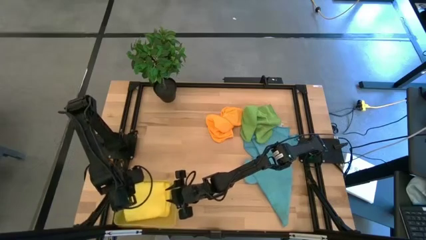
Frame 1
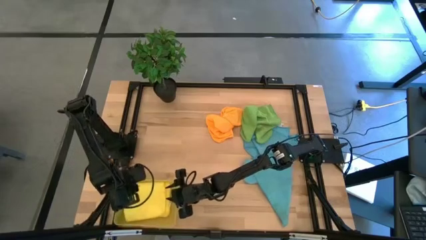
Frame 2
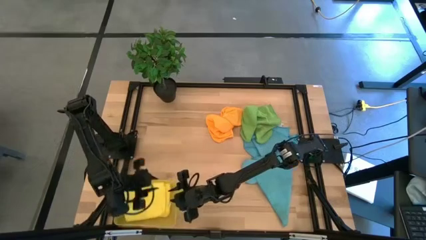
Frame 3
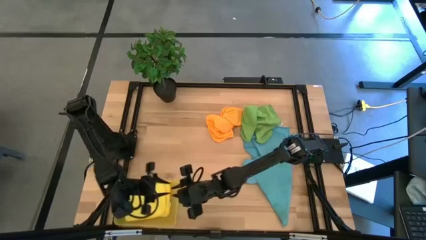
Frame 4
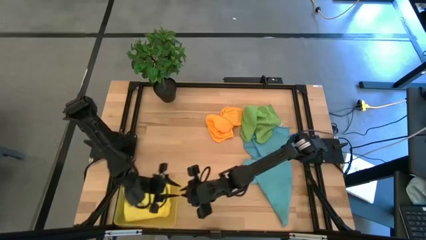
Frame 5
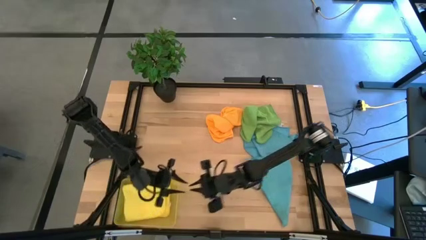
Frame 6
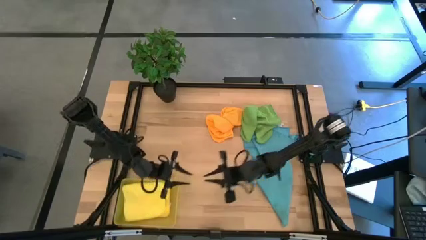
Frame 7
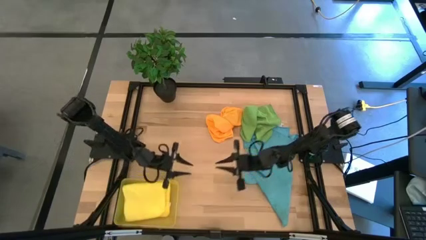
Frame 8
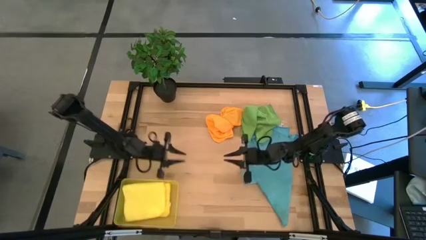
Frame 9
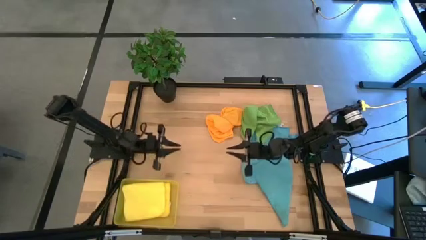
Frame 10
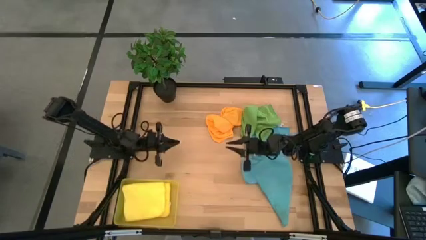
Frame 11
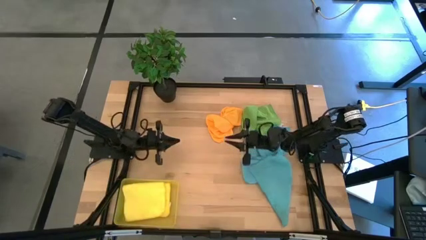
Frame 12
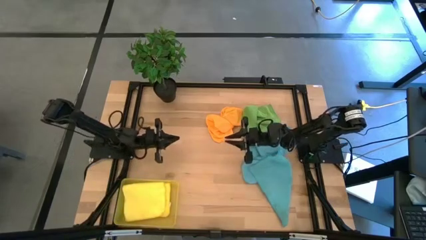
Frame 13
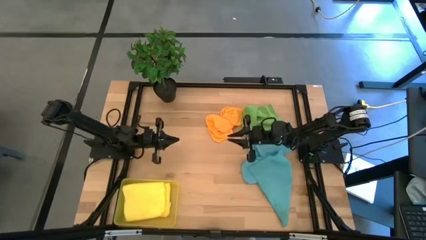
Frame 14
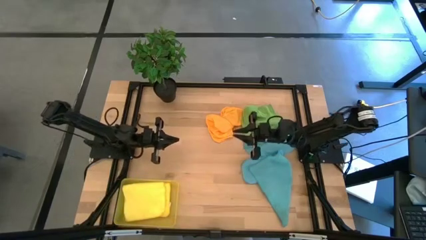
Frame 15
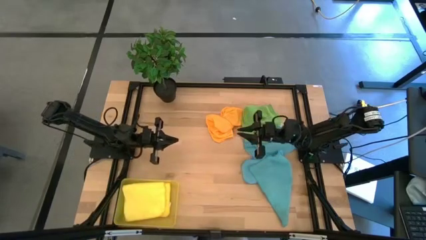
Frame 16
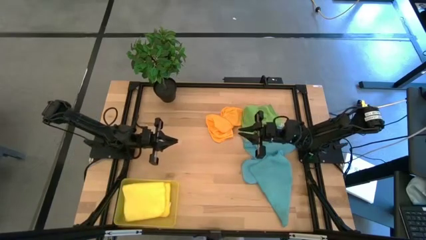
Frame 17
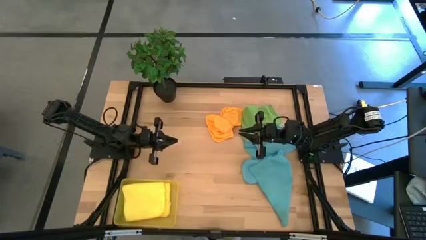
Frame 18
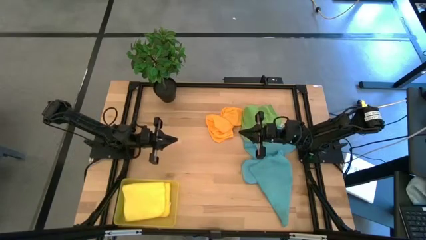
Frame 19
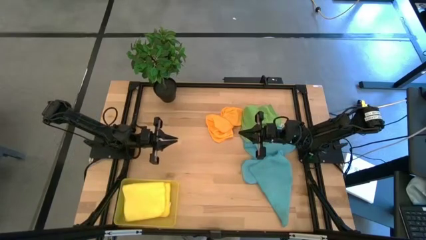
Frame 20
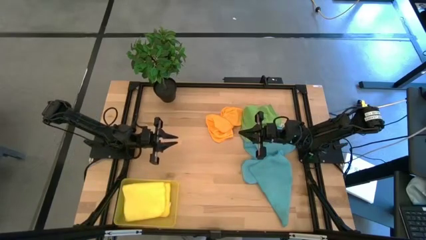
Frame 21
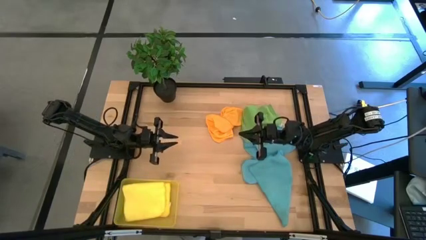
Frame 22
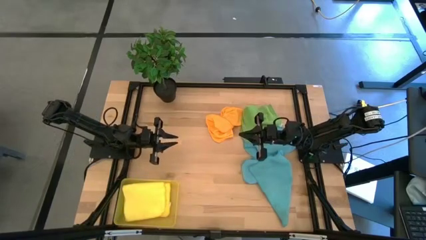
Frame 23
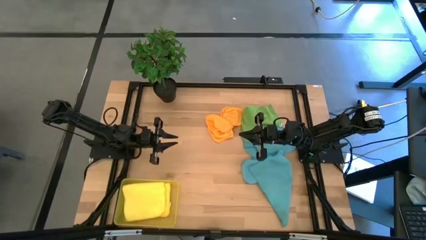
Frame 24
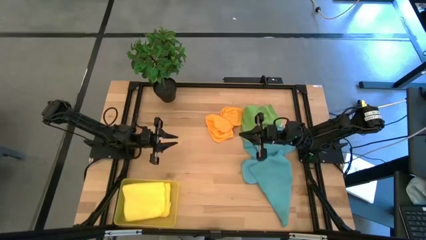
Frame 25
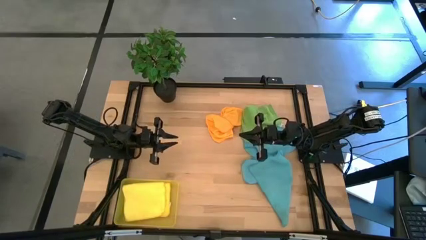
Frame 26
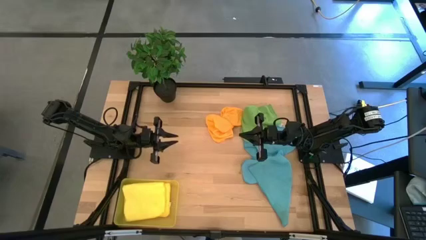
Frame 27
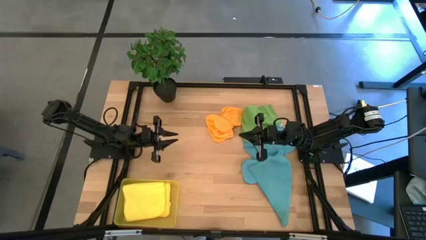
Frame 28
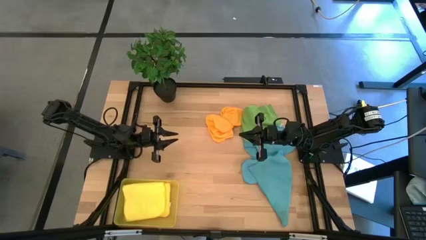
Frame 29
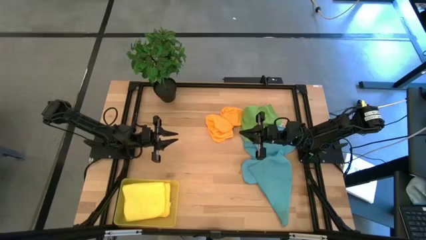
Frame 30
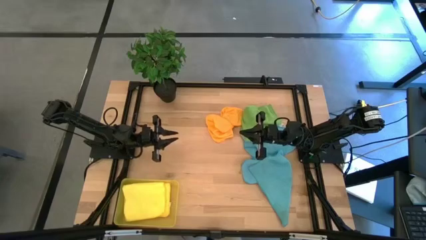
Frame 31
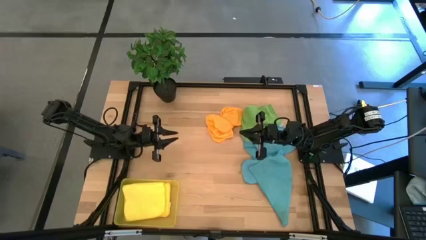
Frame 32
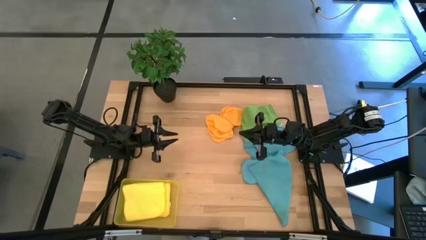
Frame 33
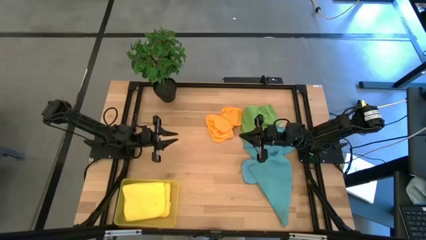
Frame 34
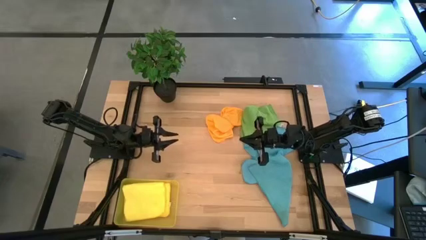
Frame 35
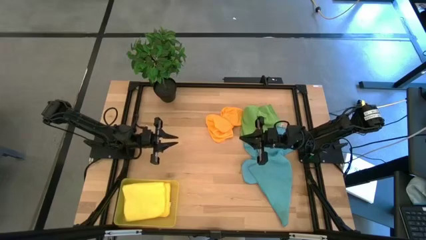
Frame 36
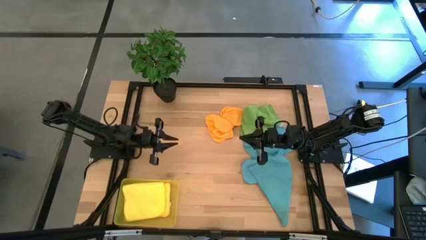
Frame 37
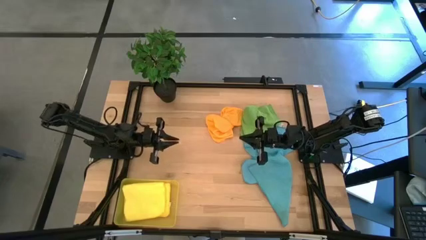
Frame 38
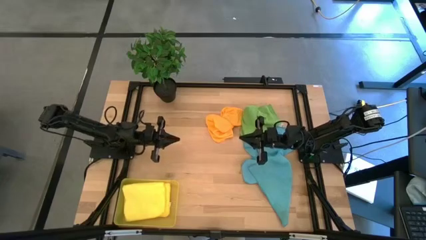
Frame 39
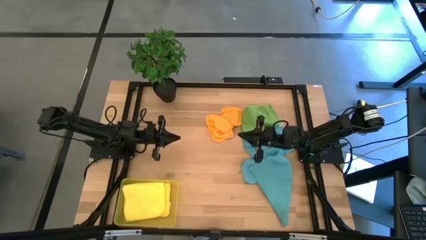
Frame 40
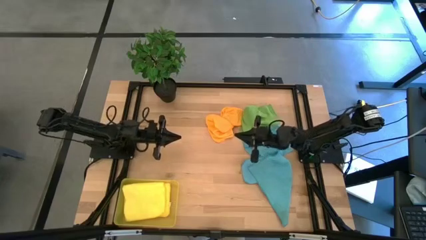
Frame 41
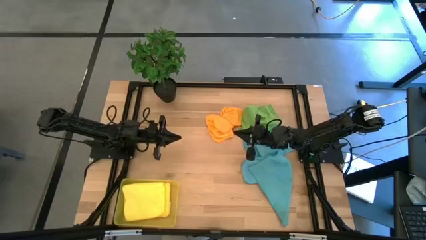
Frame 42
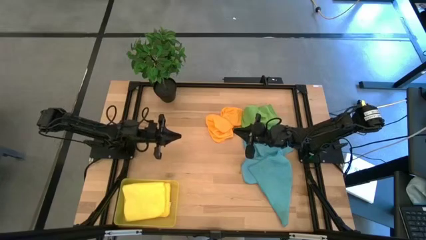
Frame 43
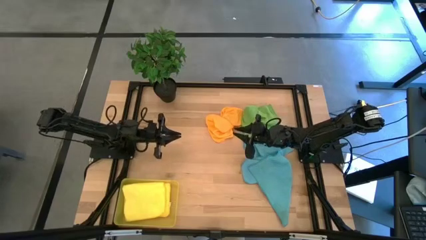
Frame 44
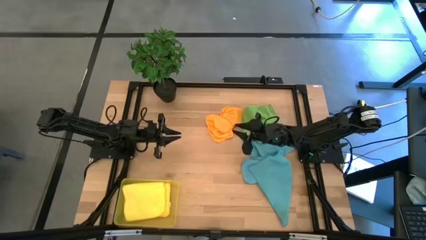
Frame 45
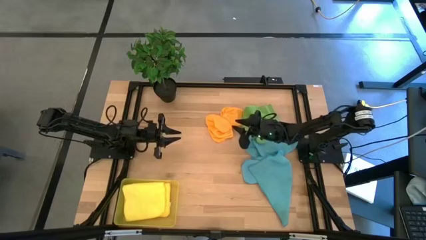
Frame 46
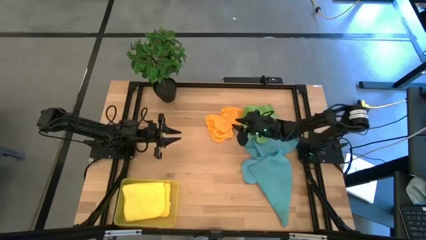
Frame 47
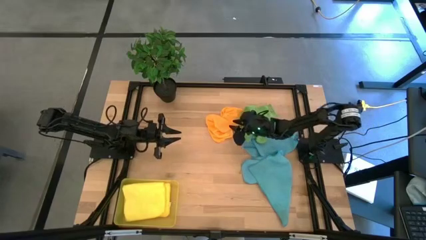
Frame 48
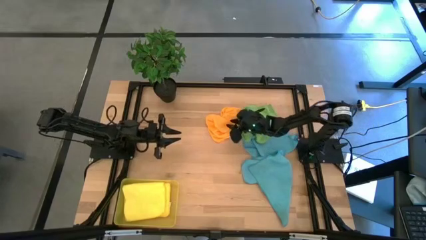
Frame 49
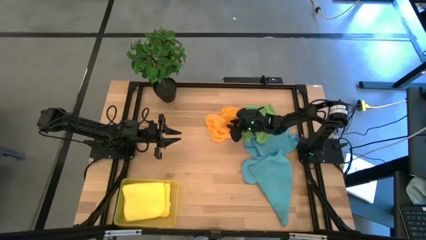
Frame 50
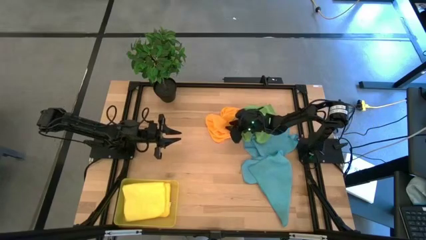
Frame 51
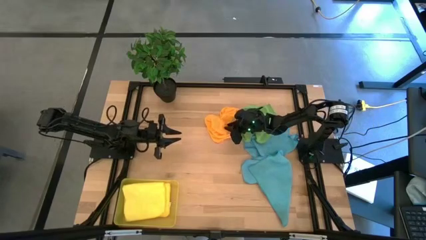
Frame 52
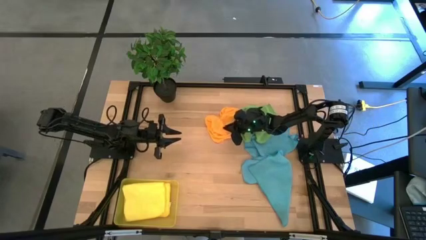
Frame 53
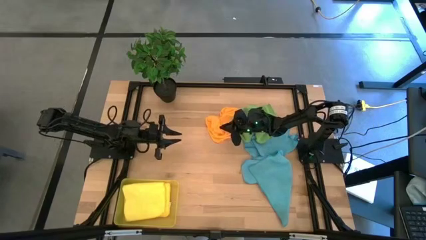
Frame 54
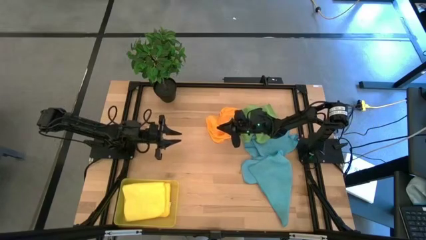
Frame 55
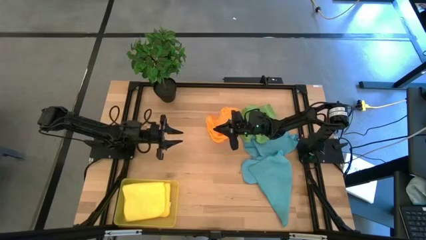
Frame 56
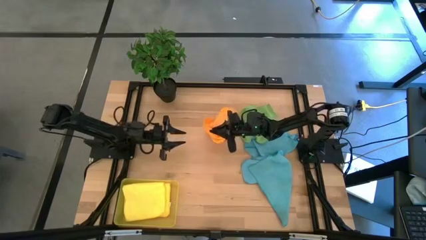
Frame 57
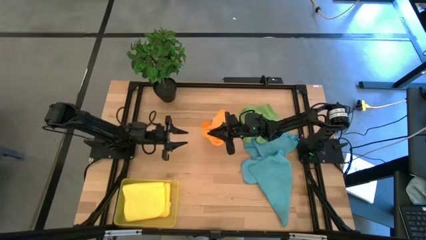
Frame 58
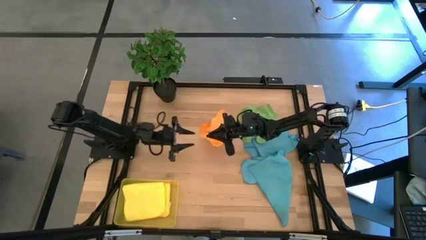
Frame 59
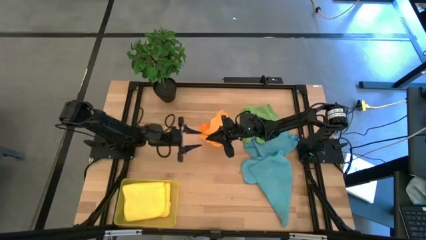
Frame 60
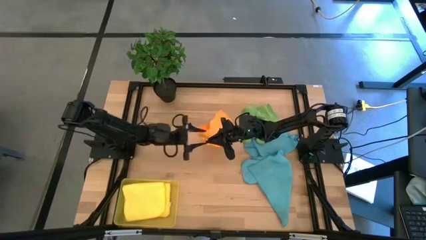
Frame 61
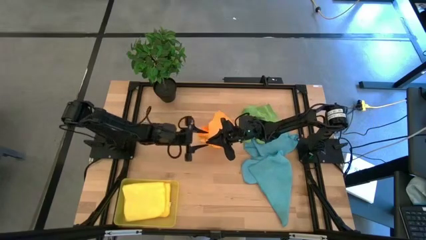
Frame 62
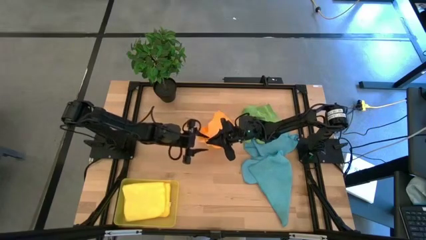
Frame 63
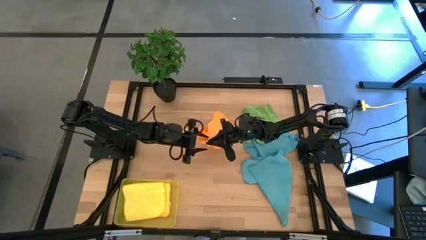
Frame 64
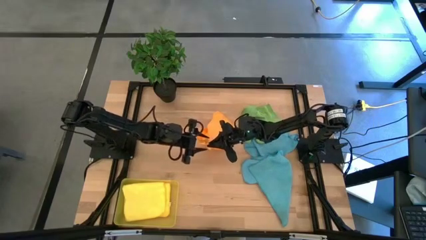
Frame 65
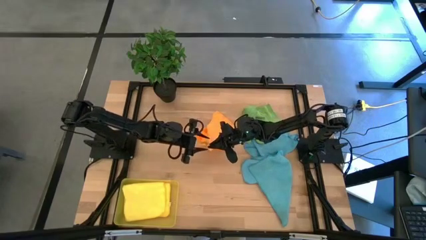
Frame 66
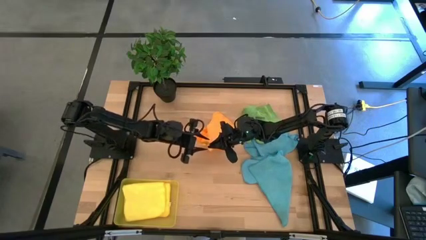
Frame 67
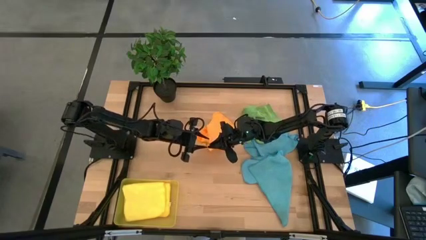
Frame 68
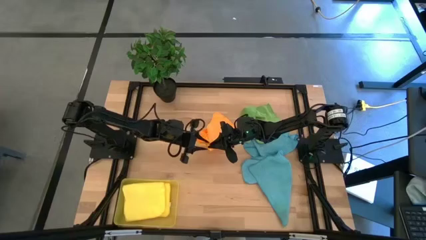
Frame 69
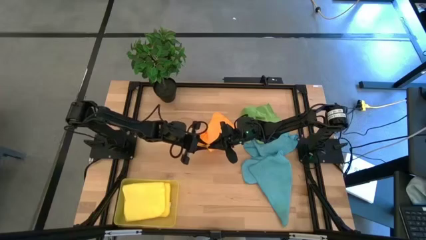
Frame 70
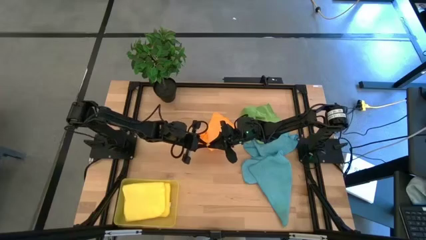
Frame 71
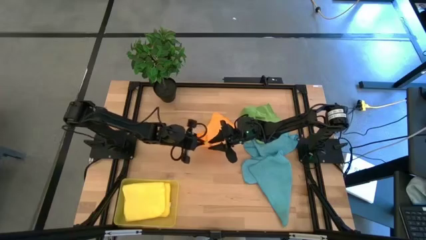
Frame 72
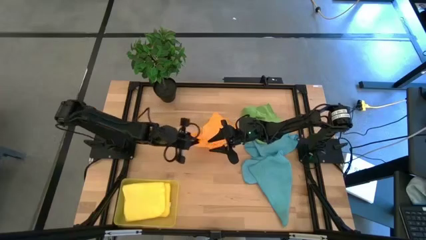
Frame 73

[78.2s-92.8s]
Task: Fold microfiber towels
Fold the orange microfiber cloth
